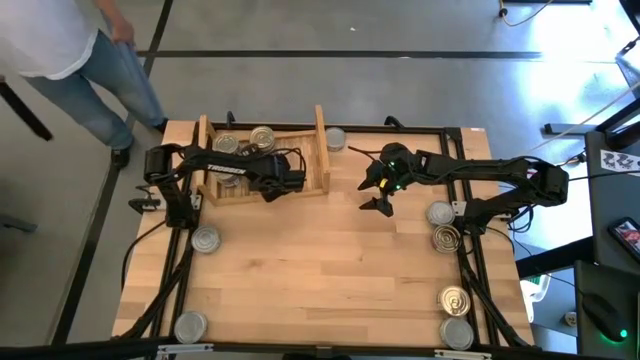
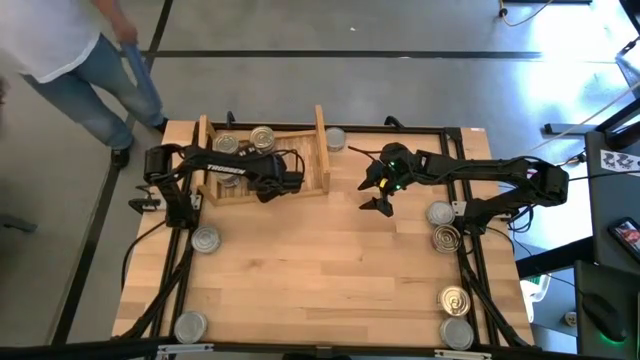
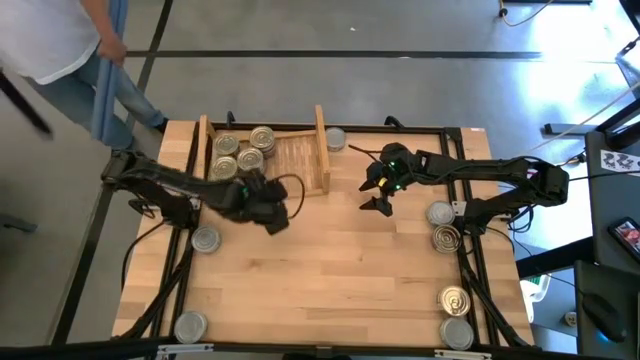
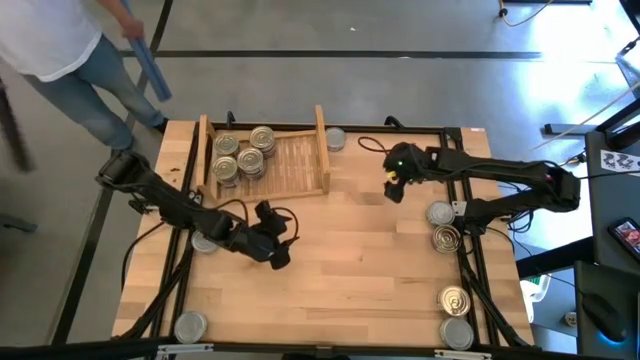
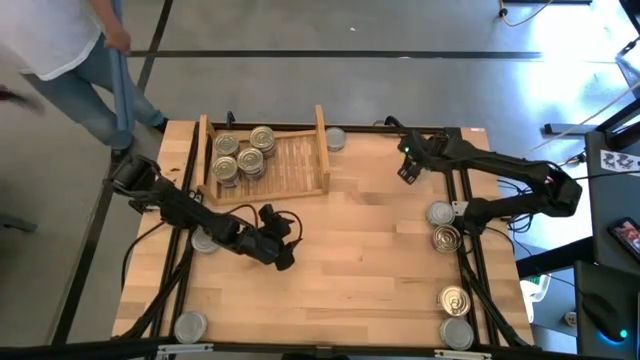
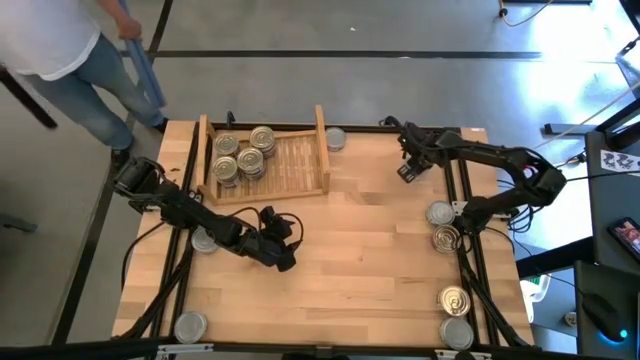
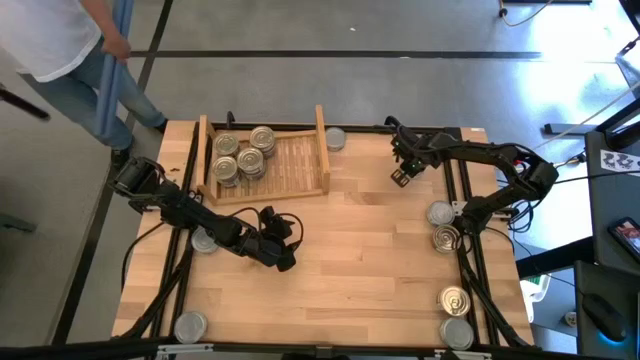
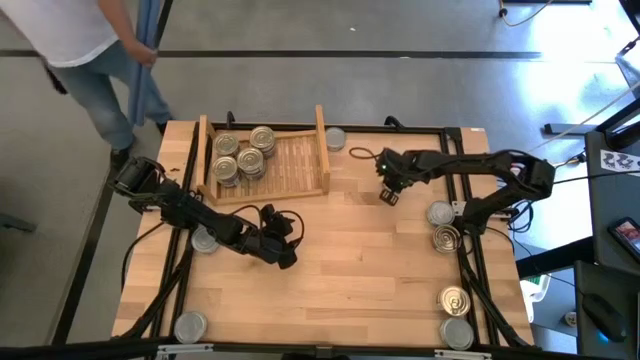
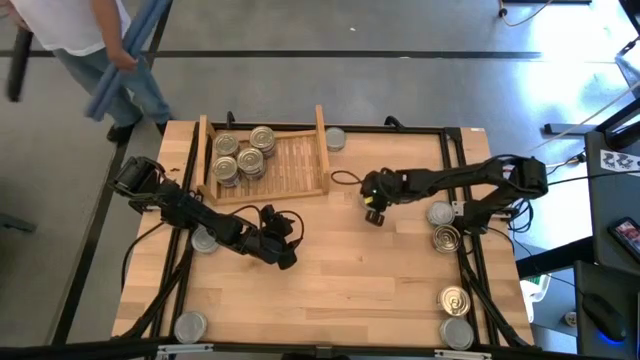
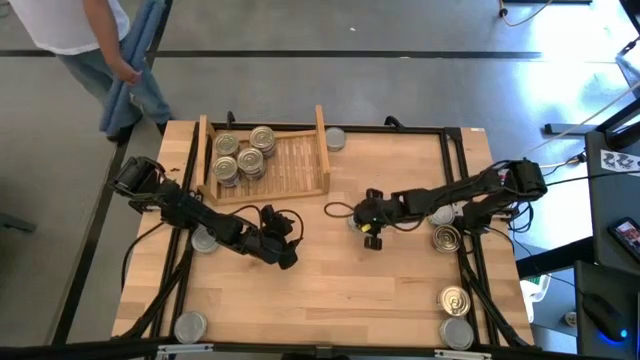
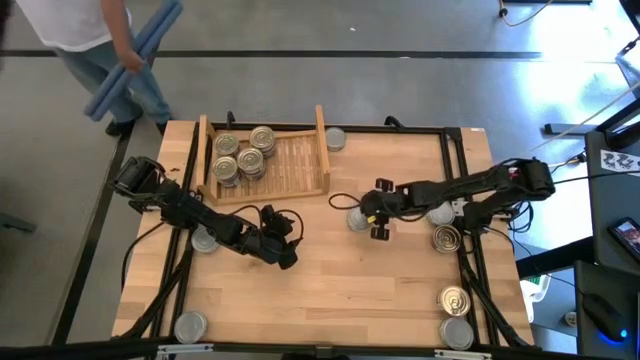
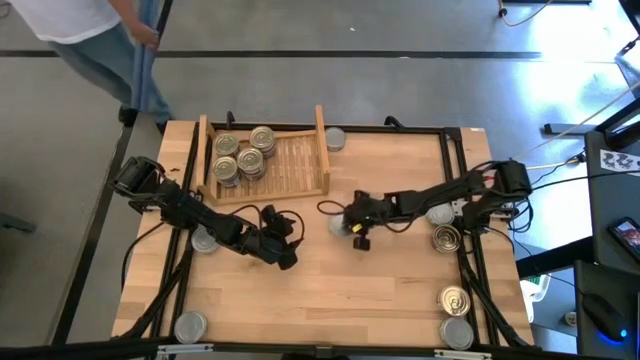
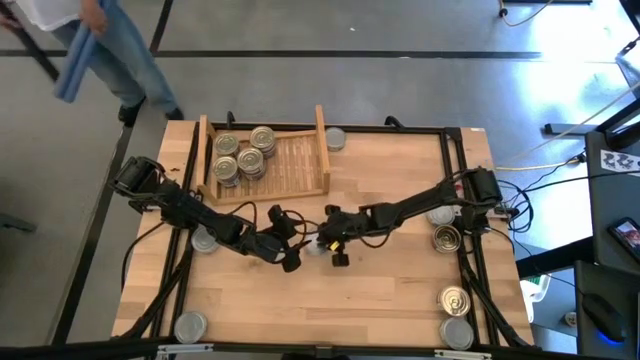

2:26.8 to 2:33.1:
Task: Stack canned seafood by type on shelf
Move the green tuna can from the top right to the center

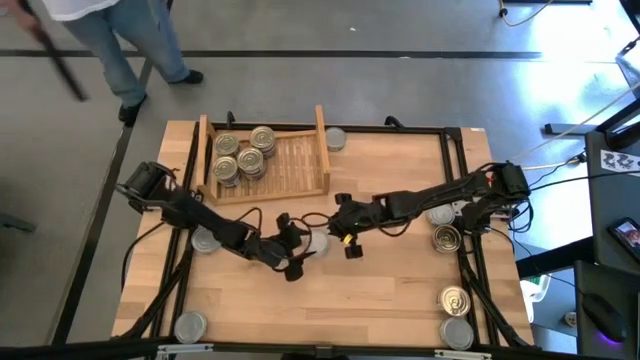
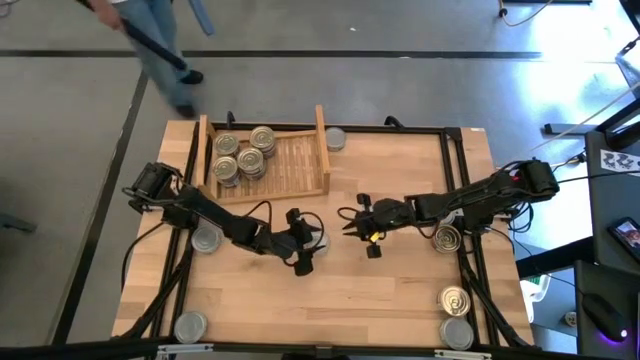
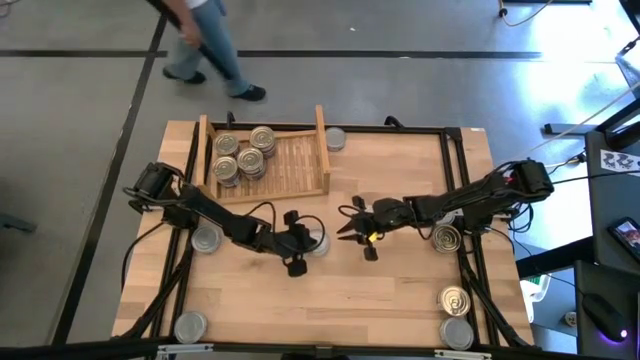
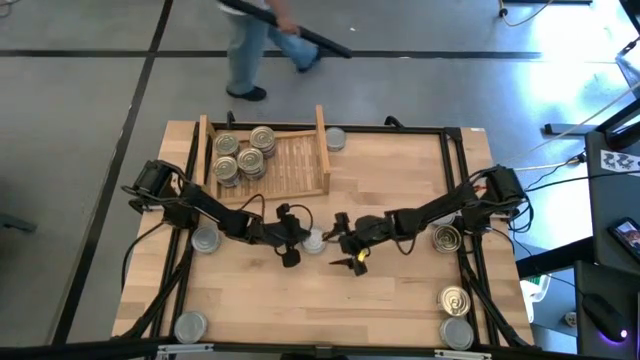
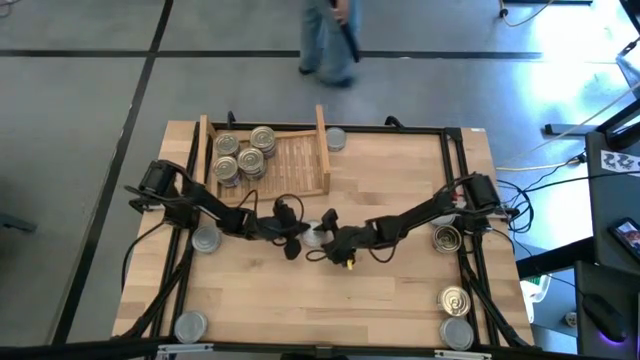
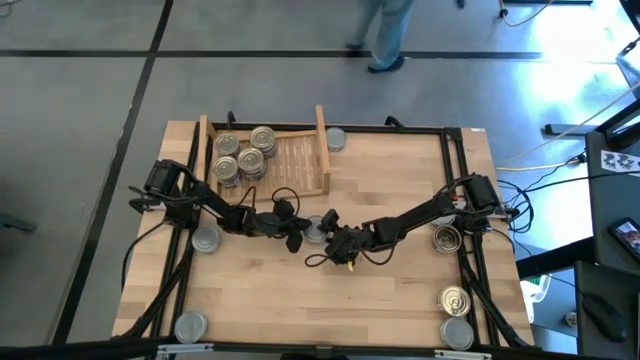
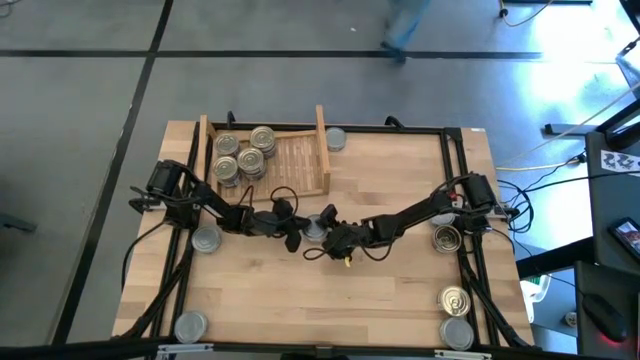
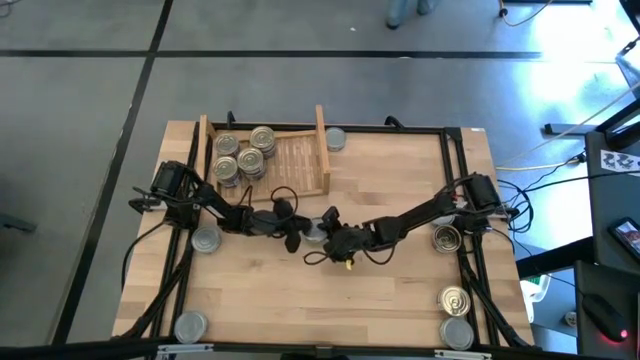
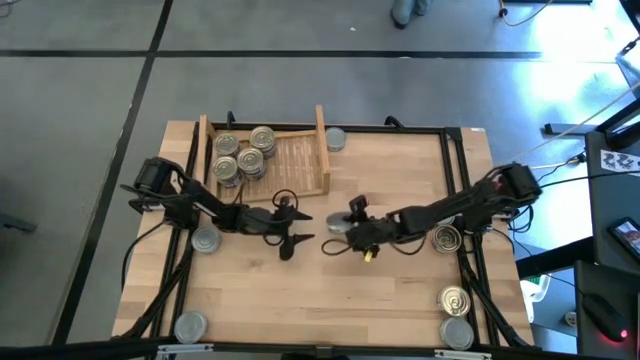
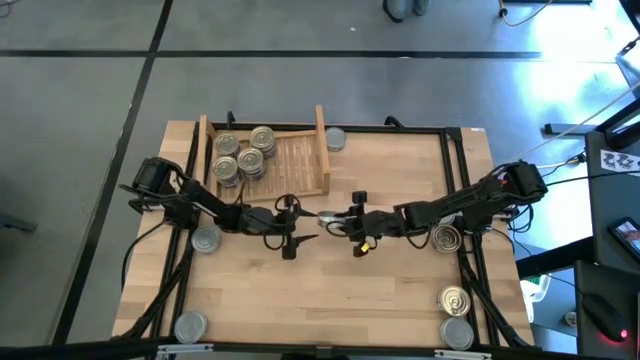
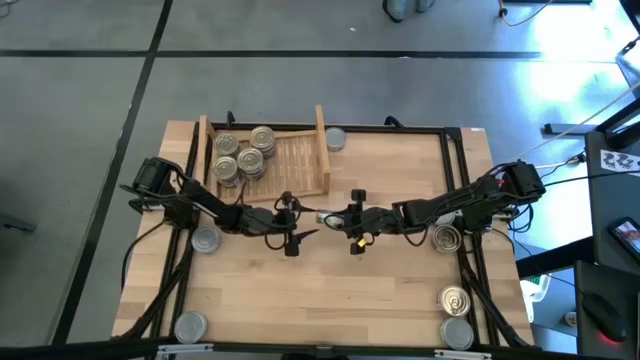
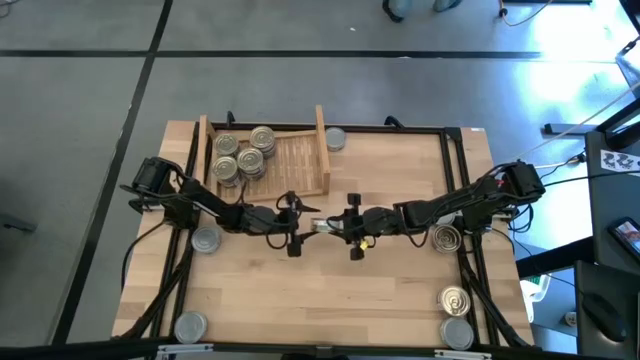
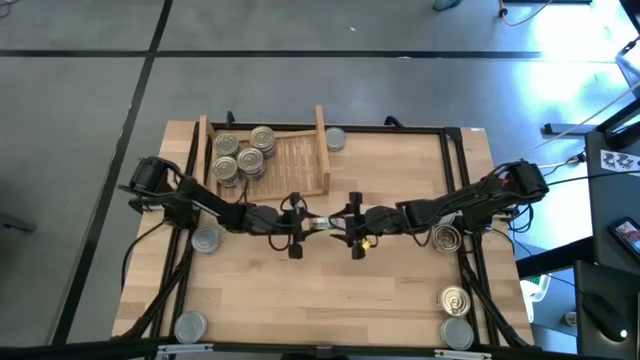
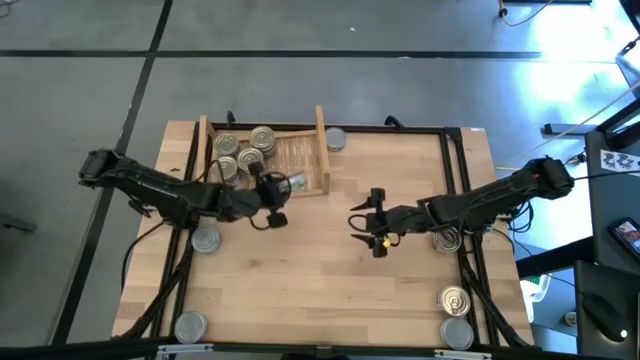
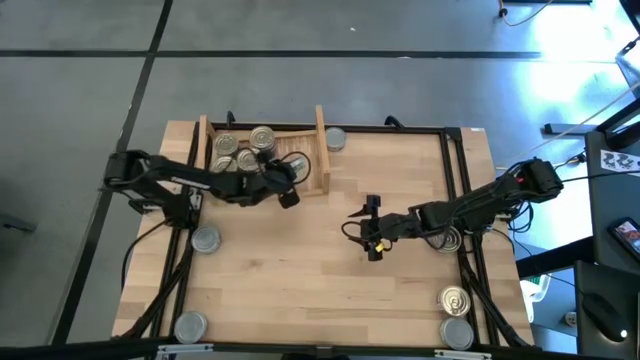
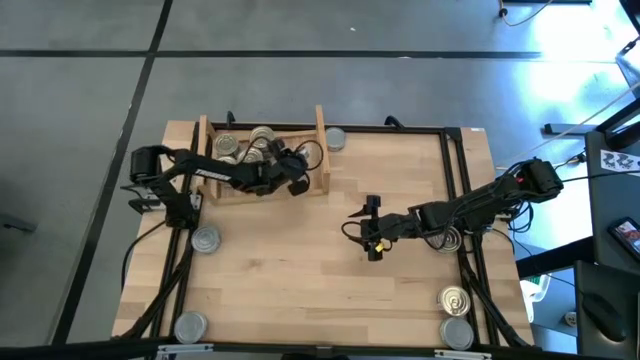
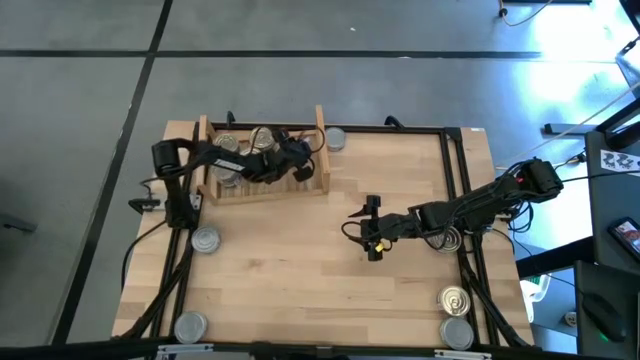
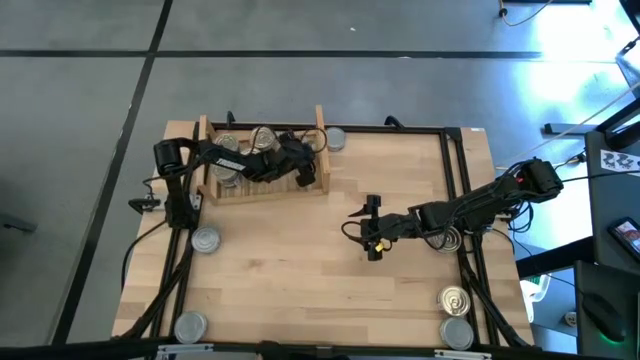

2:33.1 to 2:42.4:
Put the green tuna can on the shelf

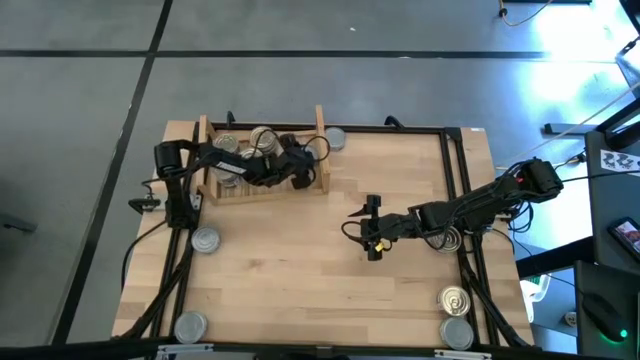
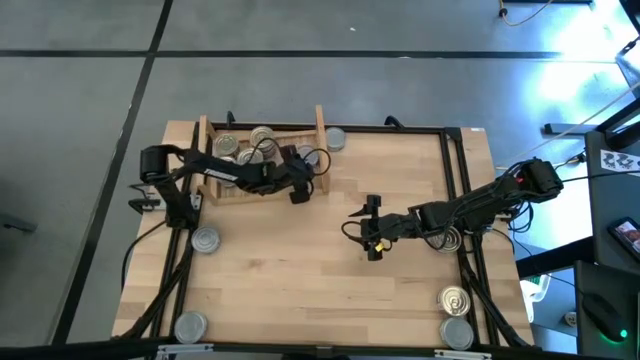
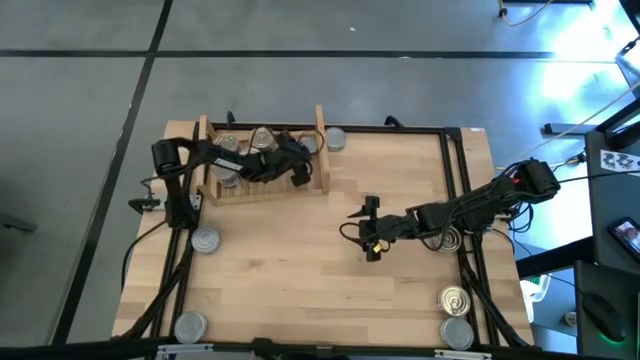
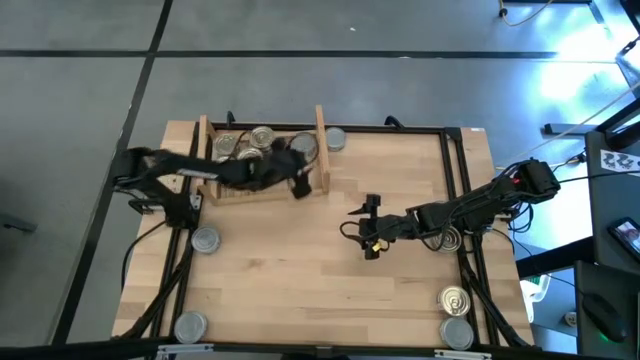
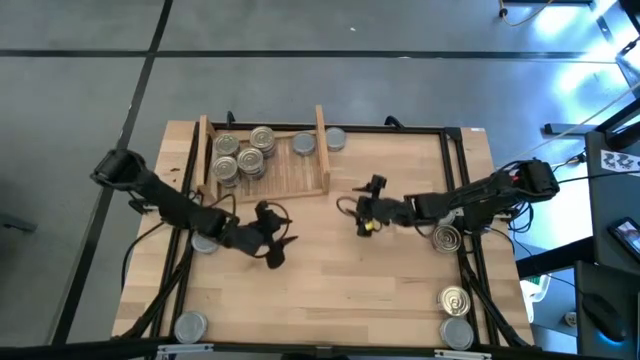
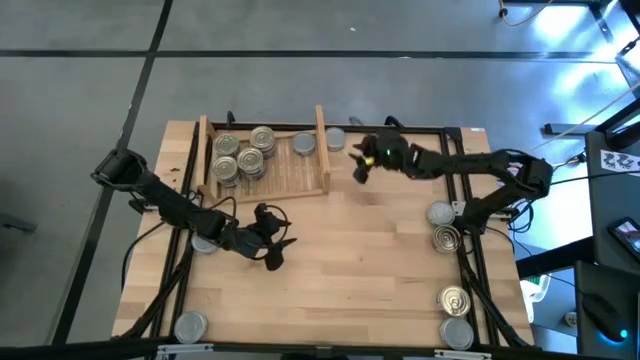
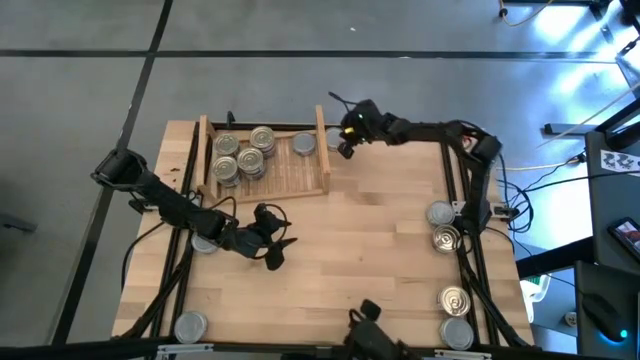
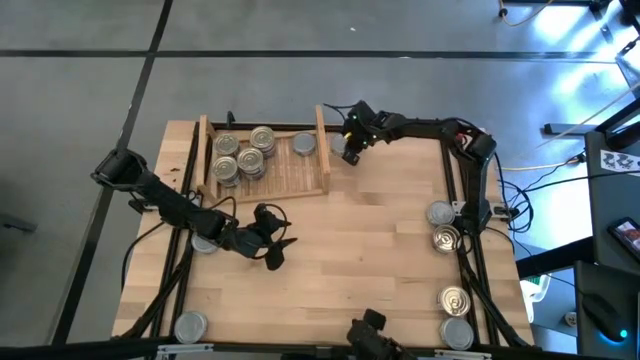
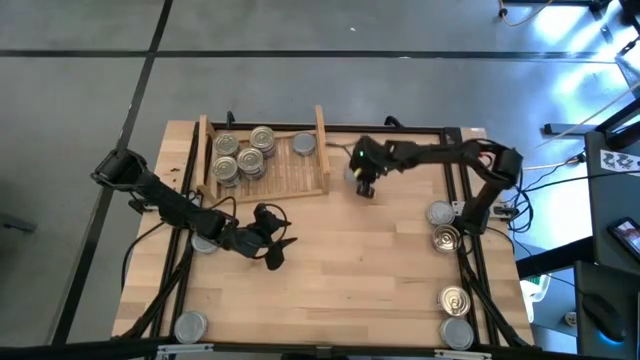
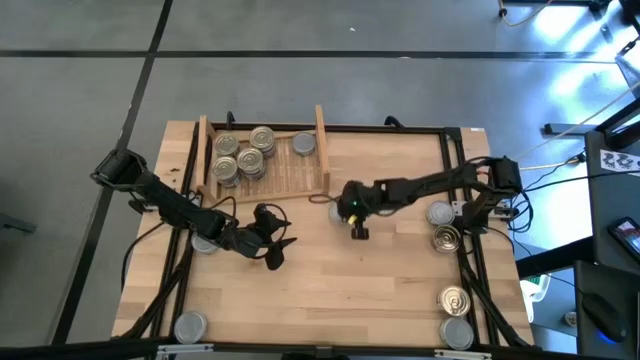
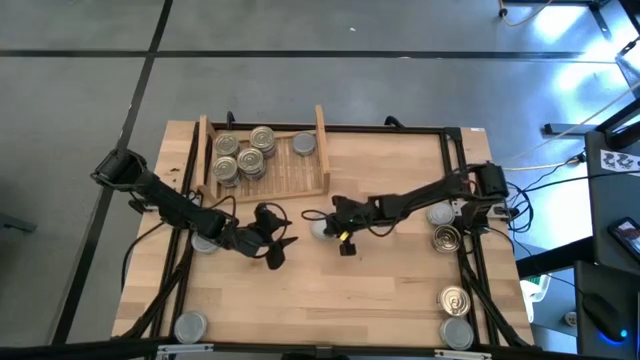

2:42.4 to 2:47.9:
Move the green tuna can from the top center to the center
